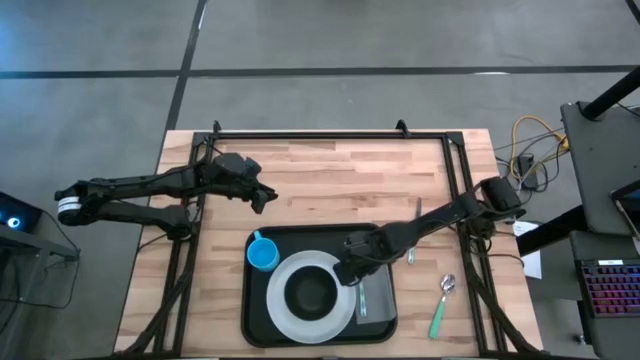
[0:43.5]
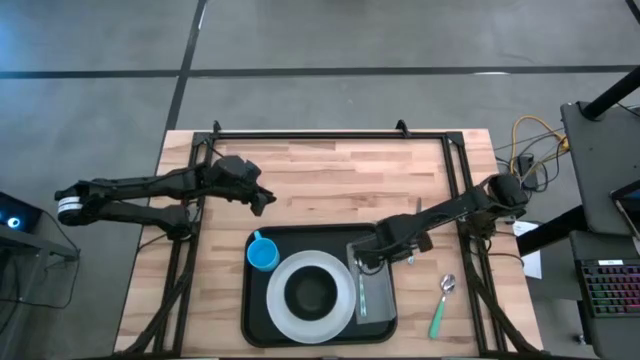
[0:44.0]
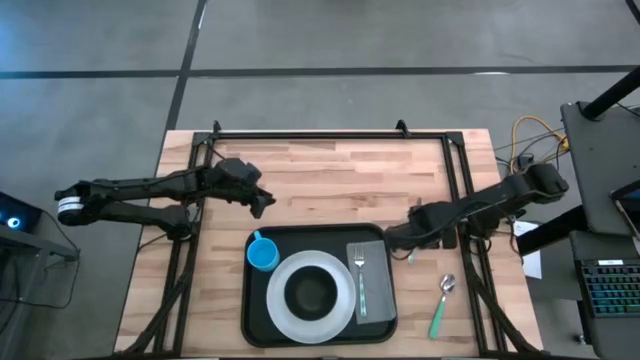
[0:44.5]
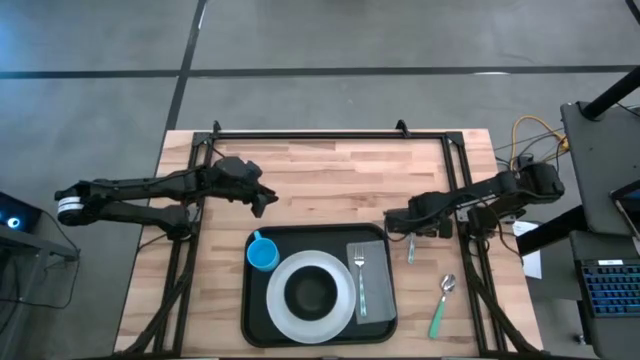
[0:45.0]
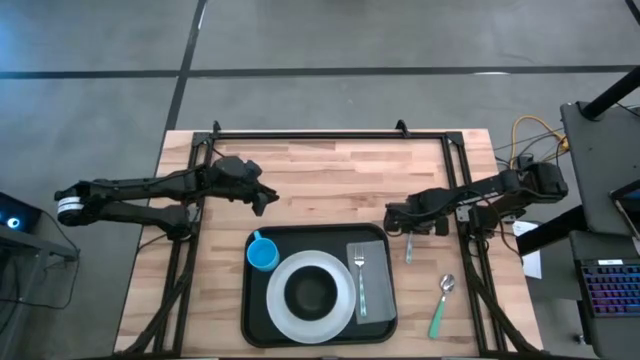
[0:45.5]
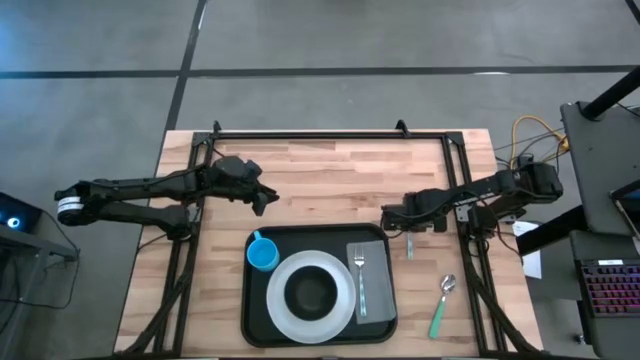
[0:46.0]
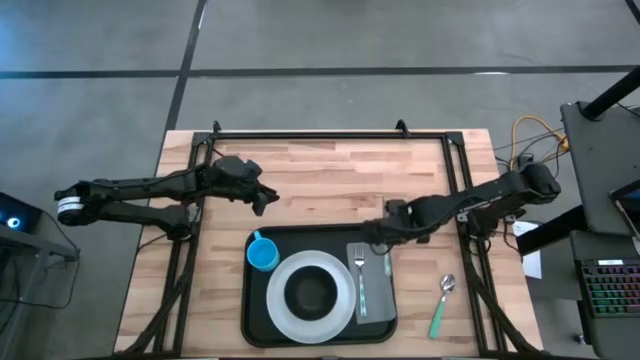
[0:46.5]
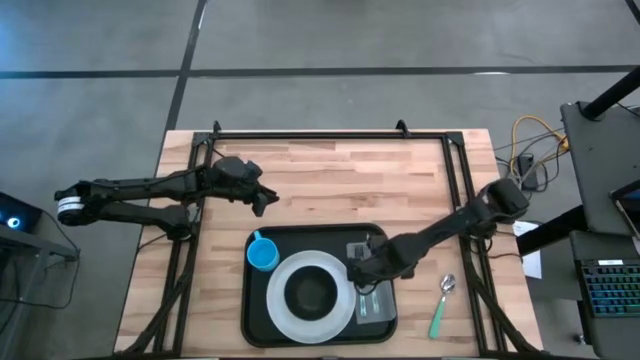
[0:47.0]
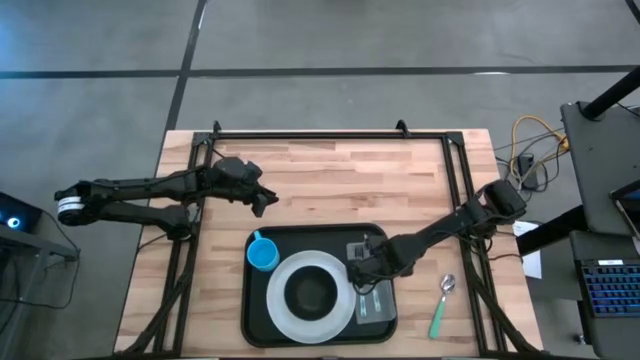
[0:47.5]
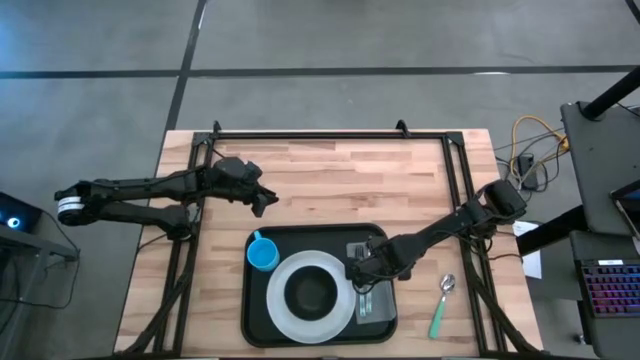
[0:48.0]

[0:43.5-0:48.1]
Task: Set up tray
Put the white knife on the gray napkin to the right side of the white fork

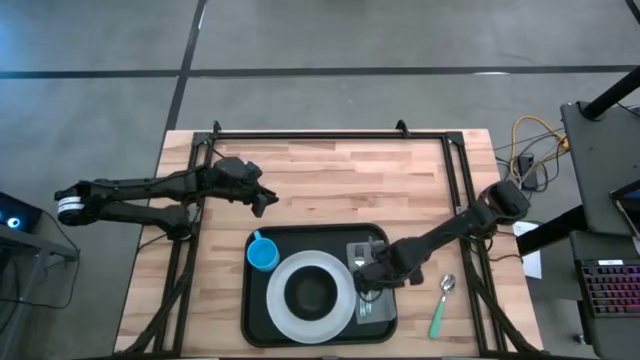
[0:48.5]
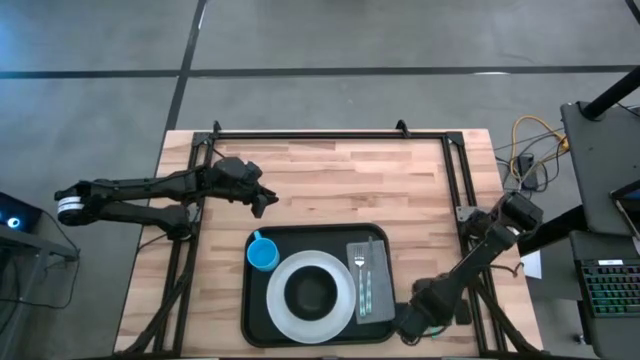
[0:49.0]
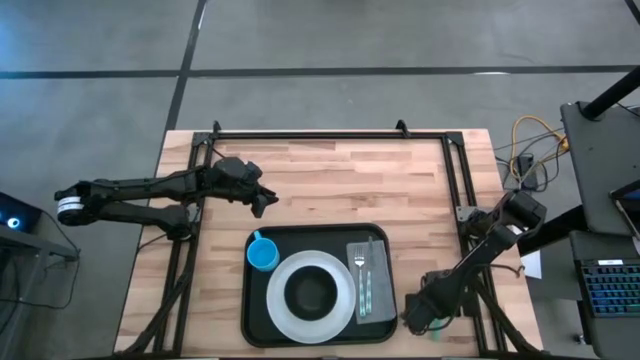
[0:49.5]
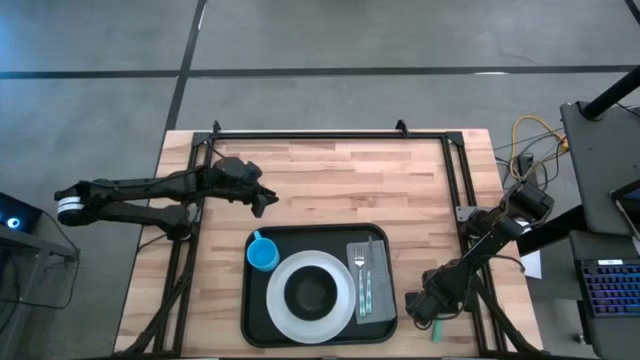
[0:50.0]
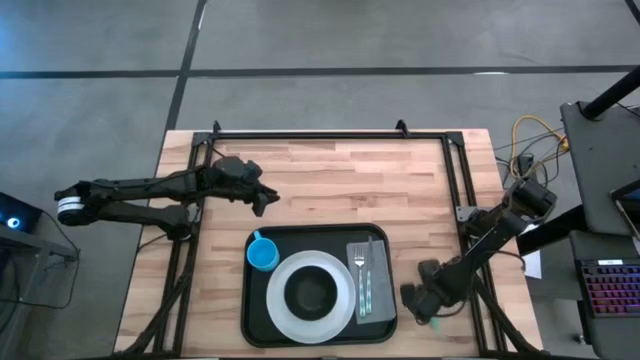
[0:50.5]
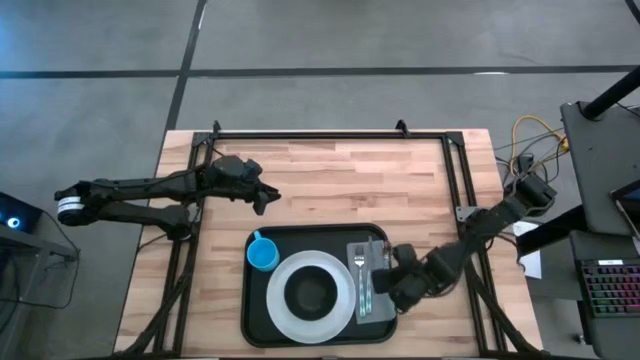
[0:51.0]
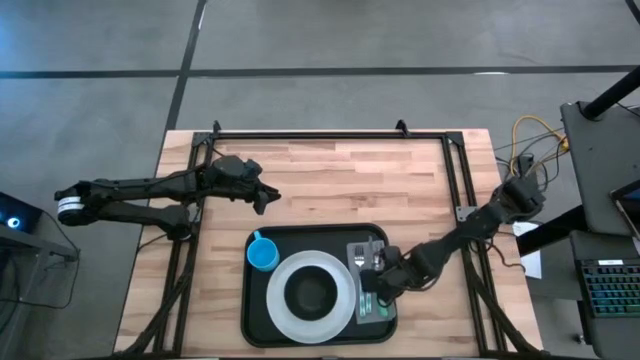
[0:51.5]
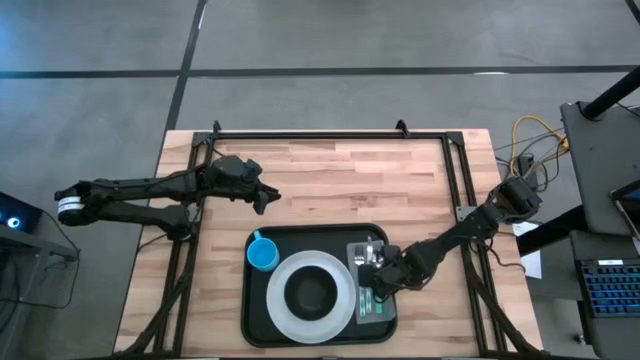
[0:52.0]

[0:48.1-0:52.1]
Put the green spoon on the gray napkin to the right side of the white knife

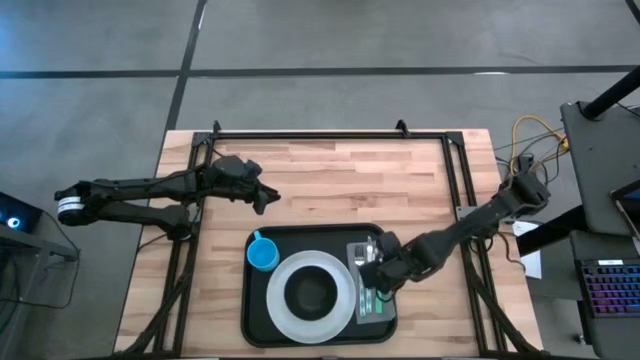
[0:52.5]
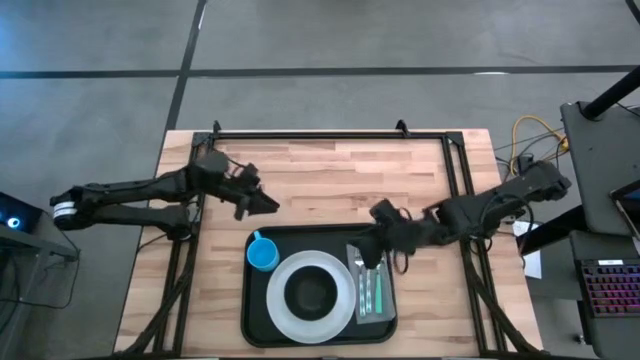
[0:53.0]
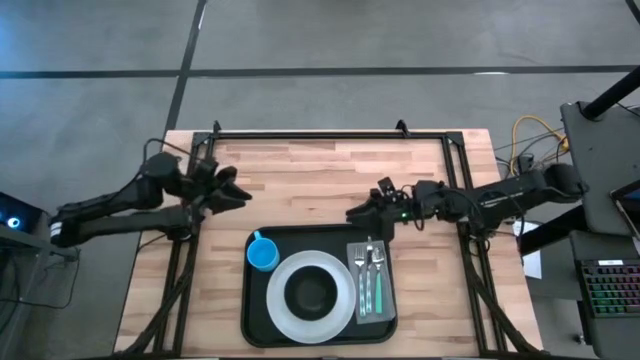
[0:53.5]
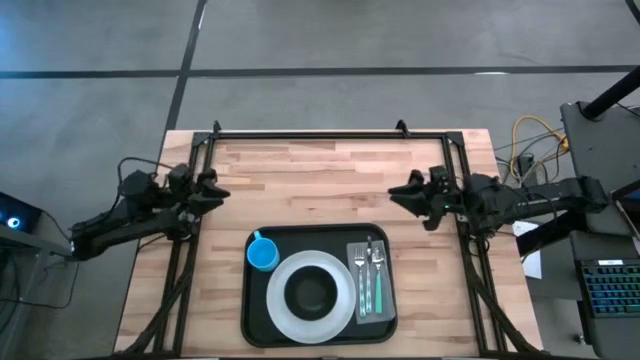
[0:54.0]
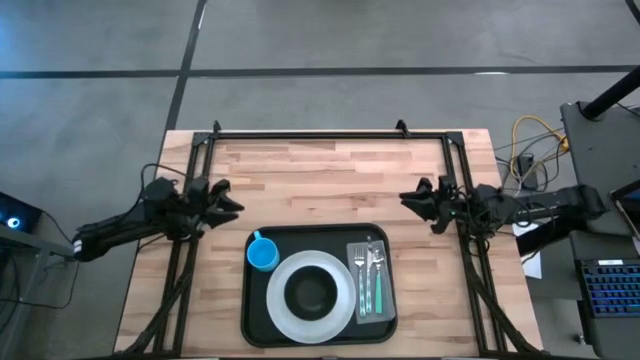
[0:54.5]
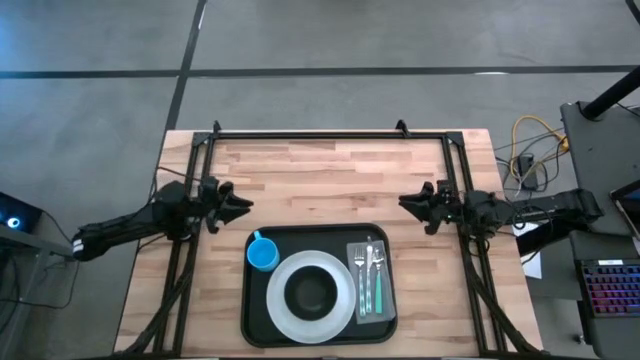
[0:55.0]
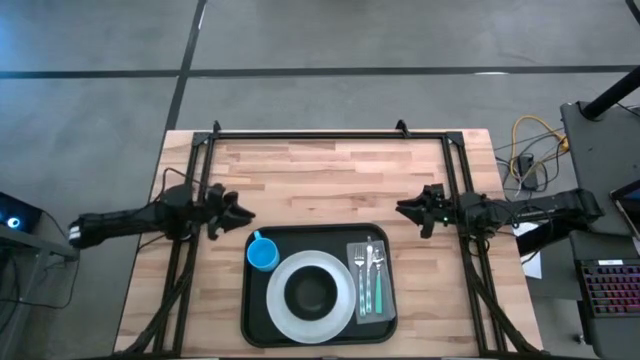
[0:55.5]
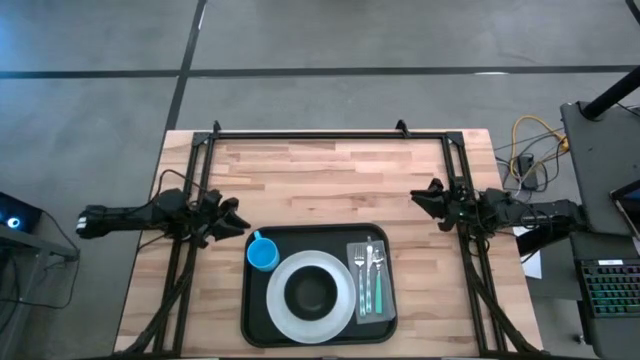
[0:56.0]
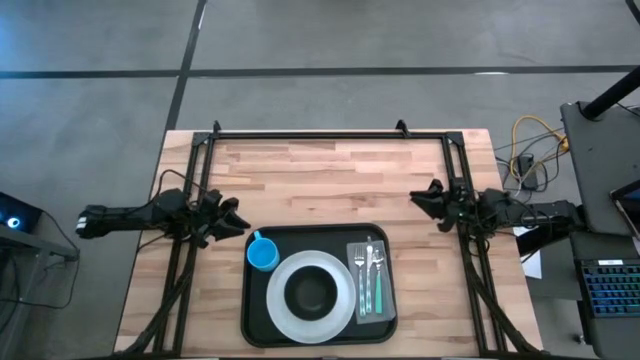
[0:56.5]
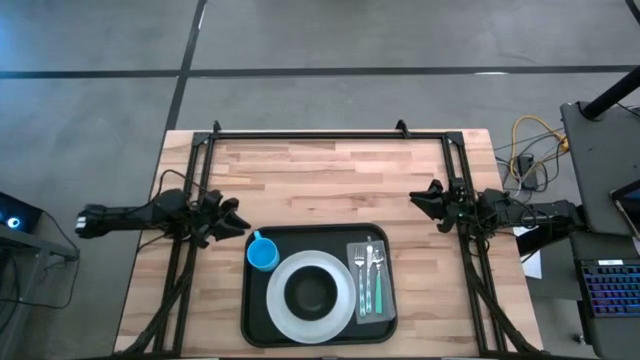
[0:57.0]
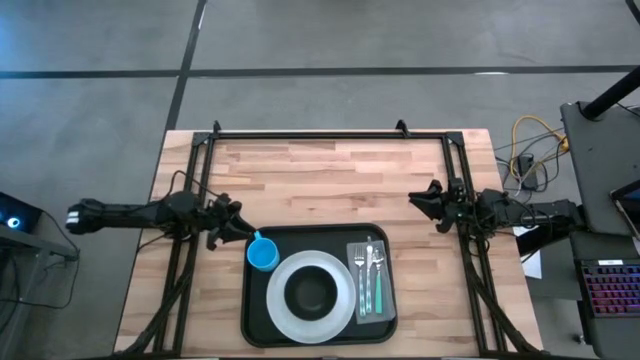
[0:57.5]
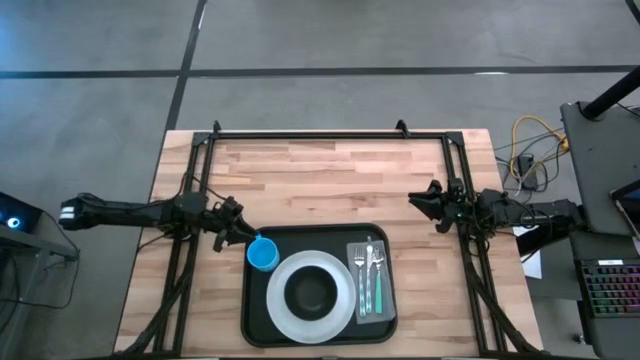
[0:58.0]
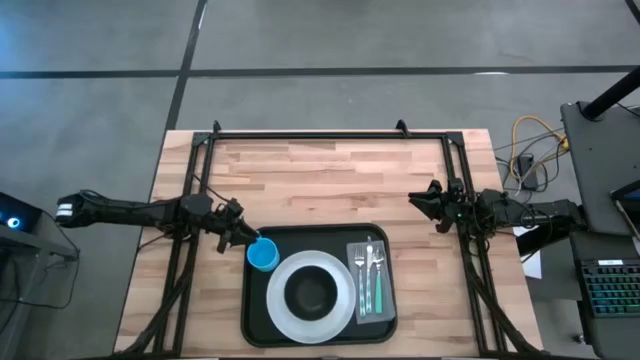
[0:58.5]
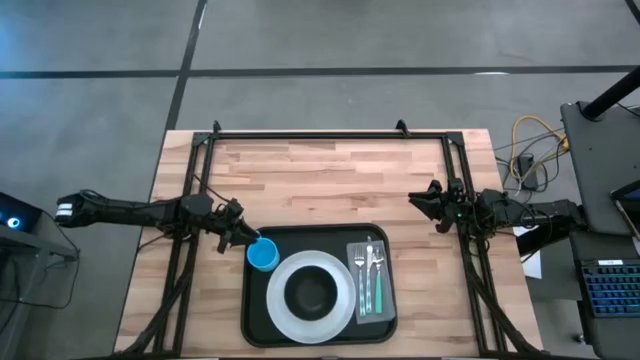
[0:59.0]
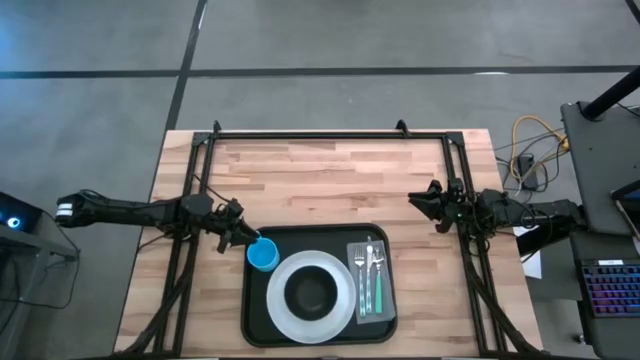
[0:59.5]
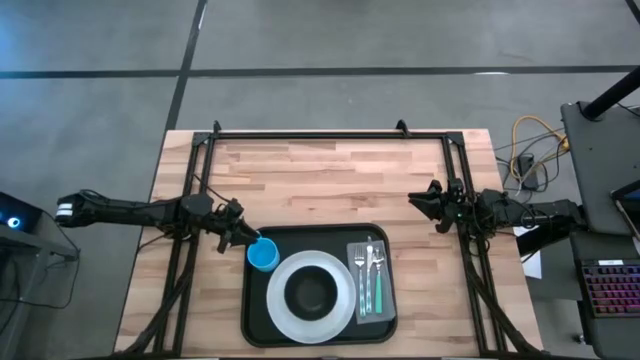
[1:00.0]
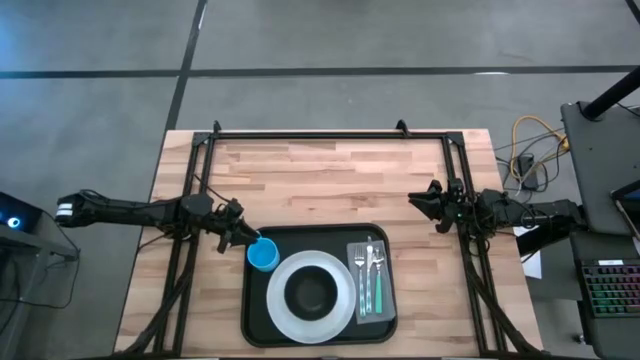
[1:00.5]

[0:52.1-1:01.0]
Return to Home Position

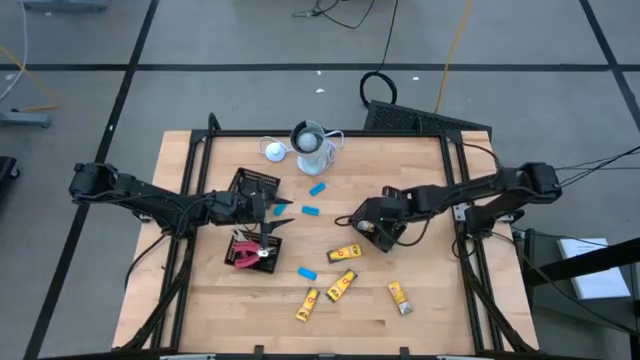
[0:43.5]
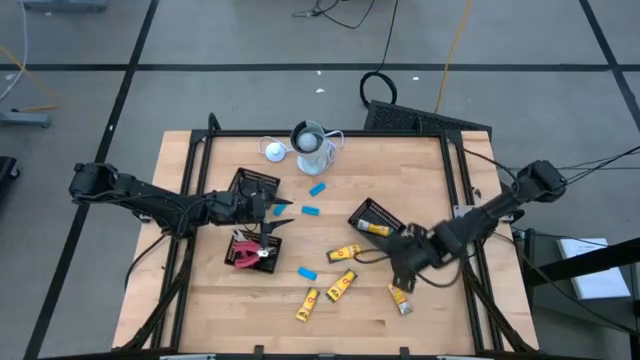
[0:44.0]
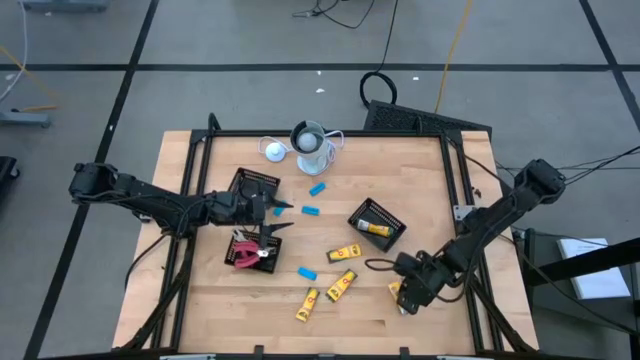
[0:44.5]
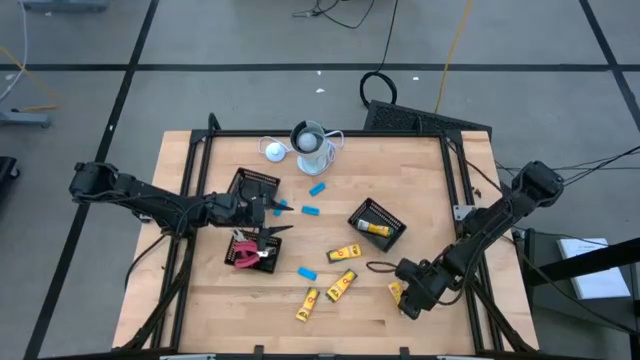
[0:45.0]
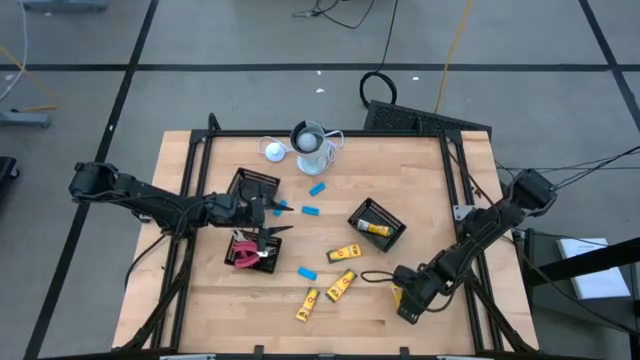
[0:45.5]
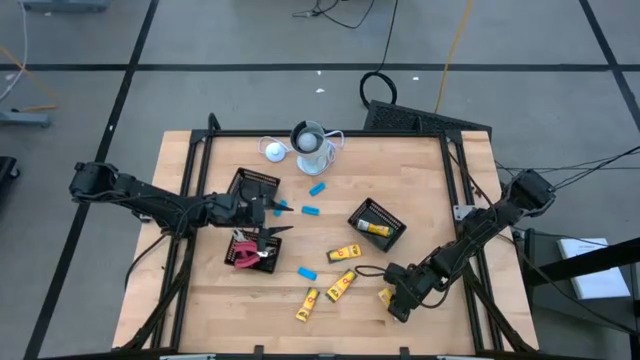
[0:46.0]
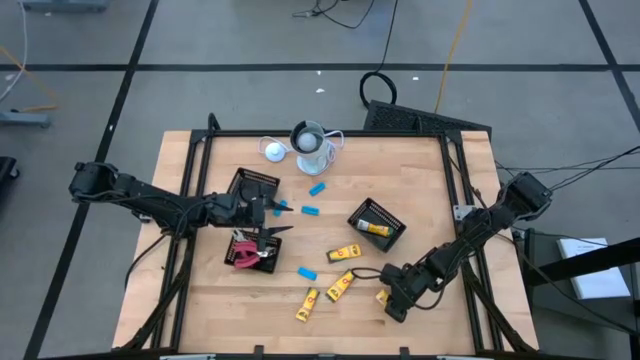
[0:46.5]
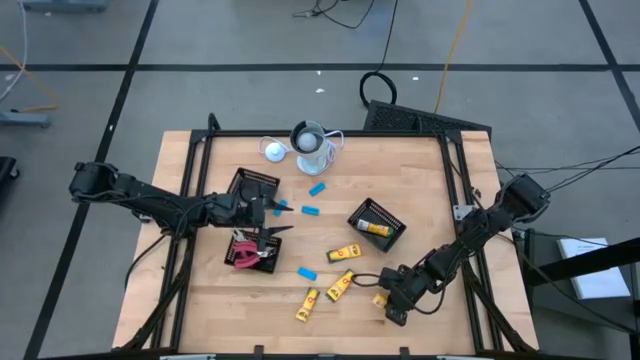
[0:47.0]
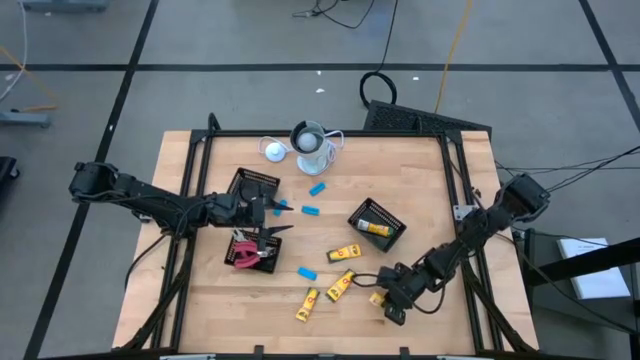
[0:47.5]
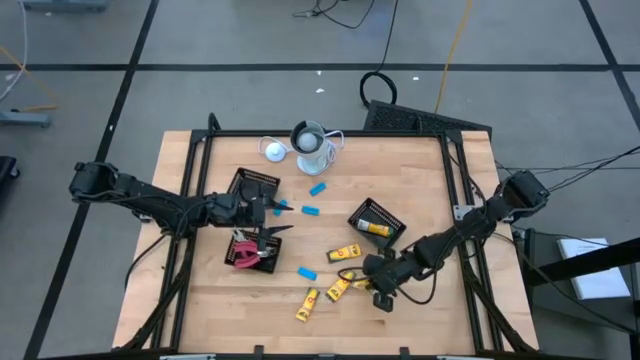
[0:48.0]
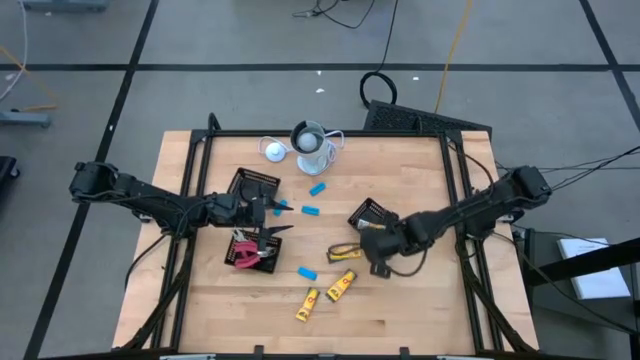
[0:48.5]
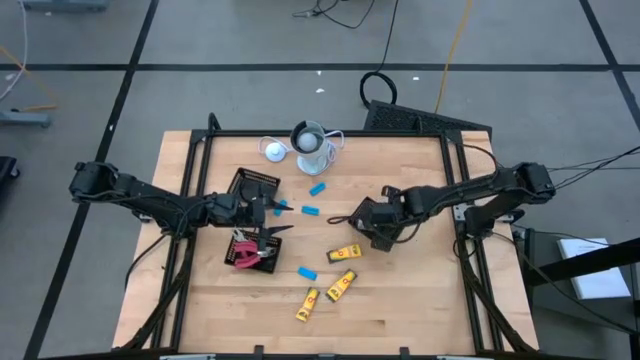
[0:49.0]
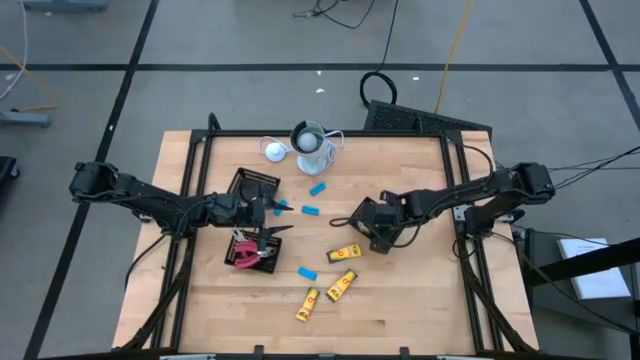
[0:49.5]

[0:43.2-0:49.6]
Task: Pick & Place School Supplies
Put the yellow crayon box into the bottom right black bin
